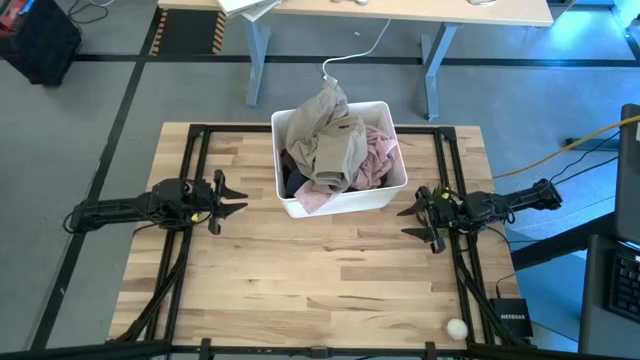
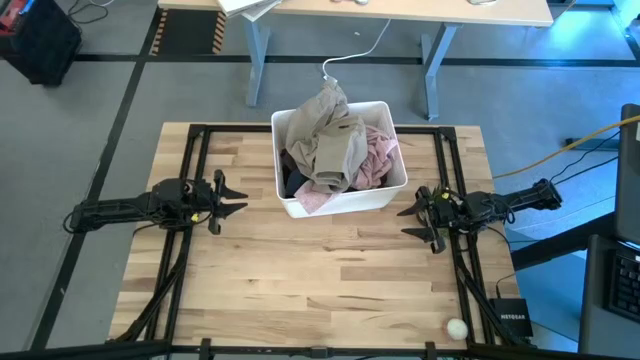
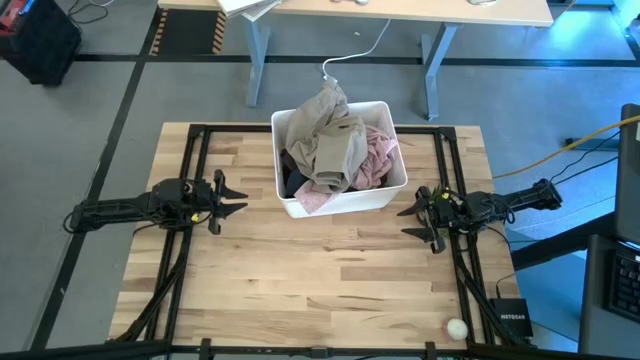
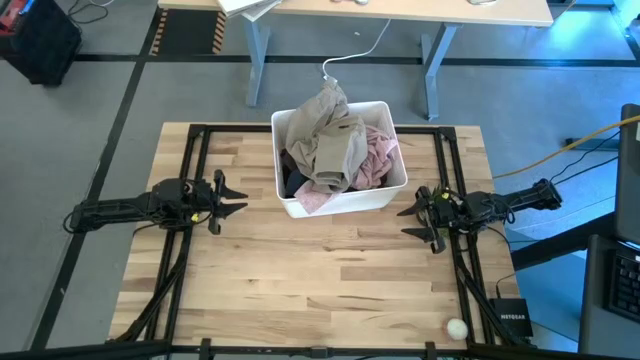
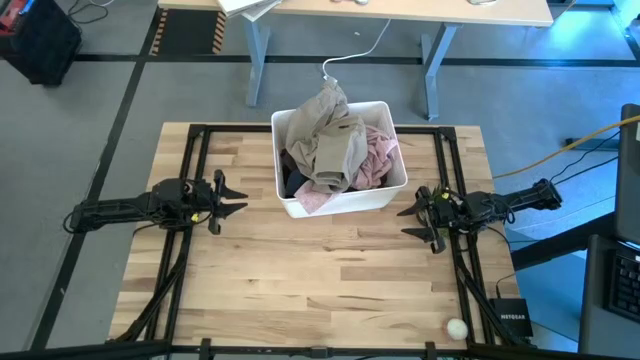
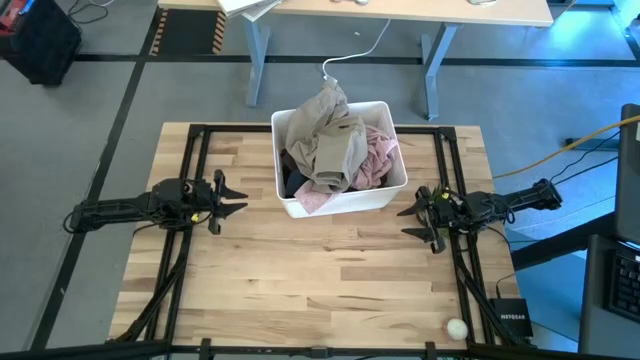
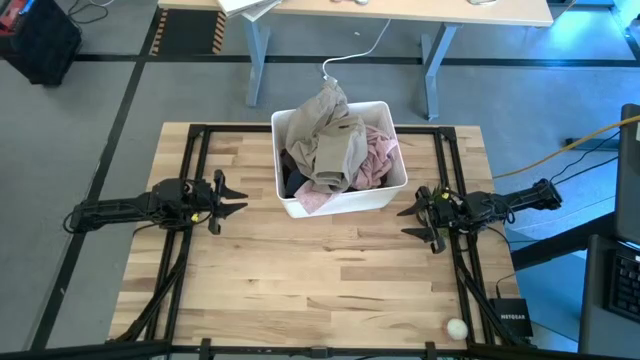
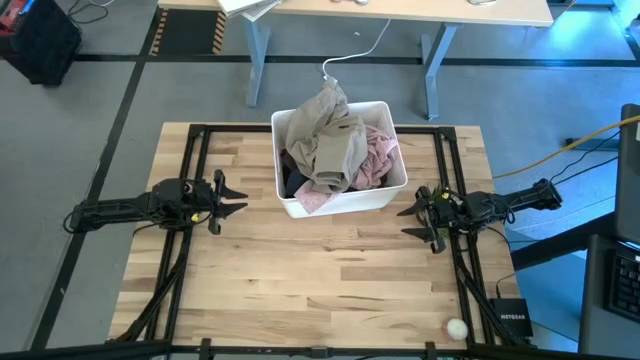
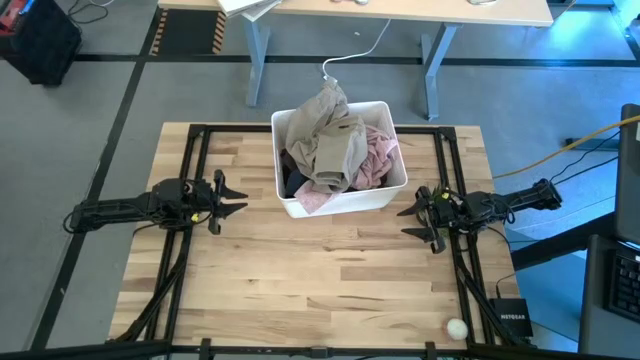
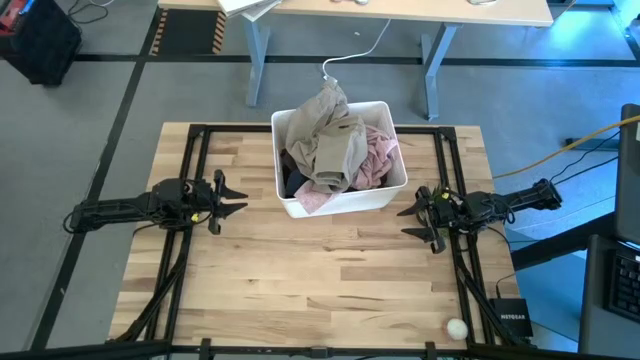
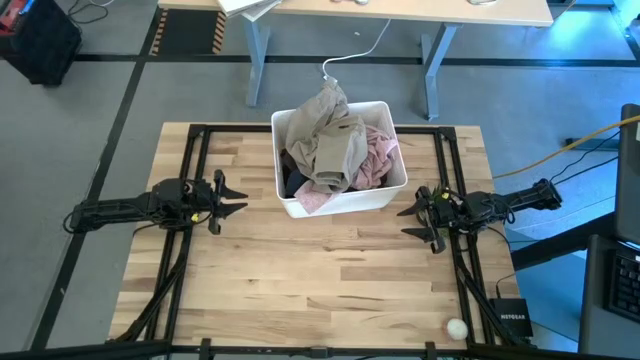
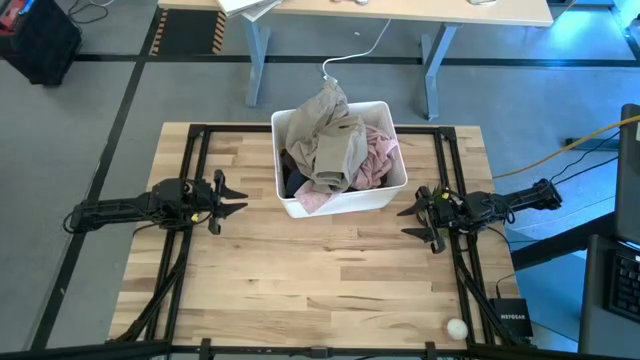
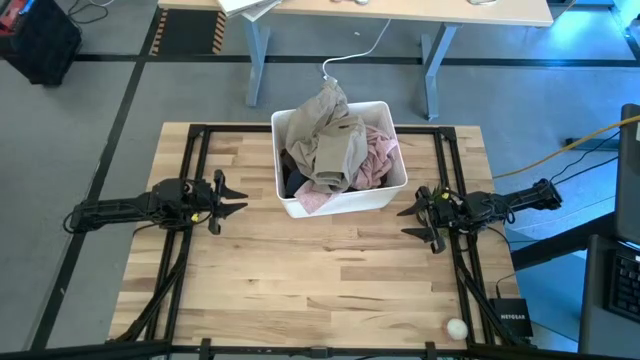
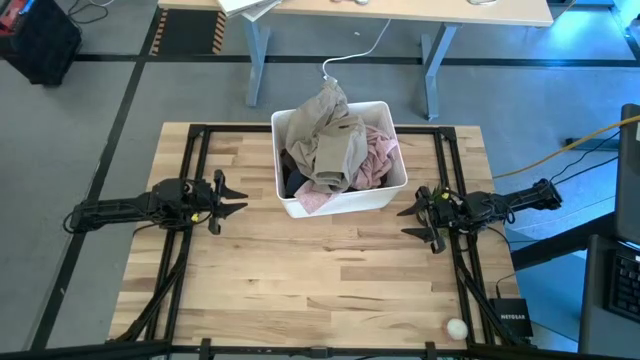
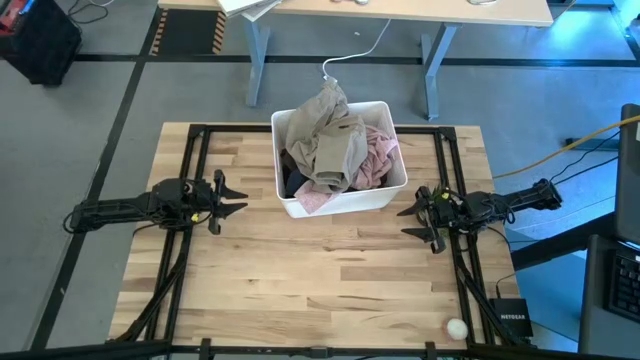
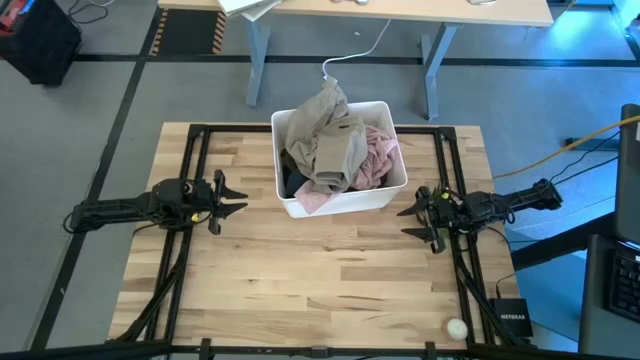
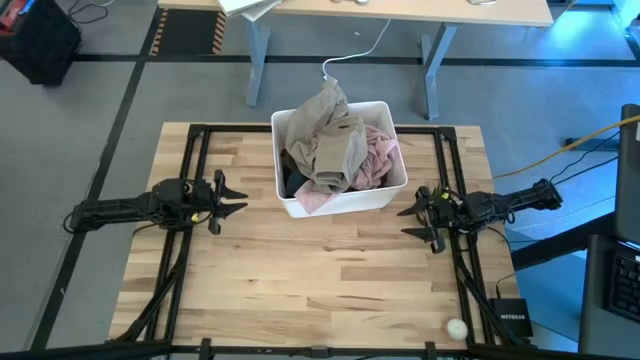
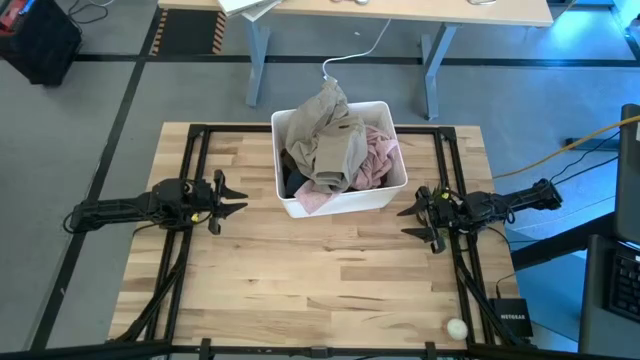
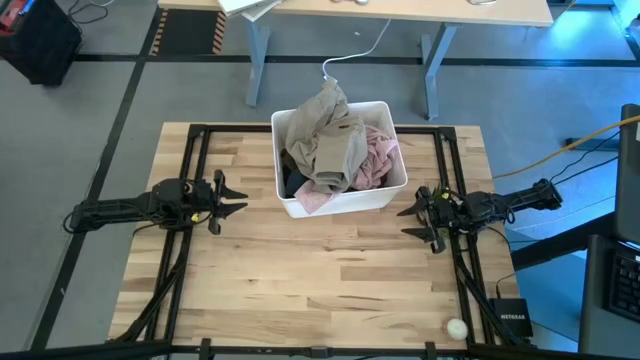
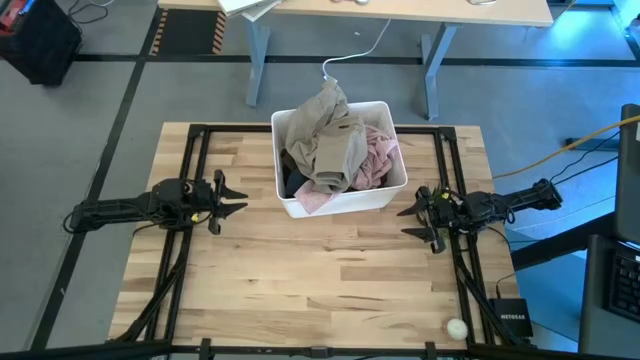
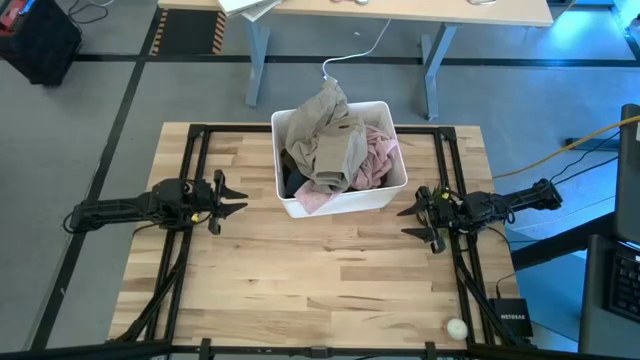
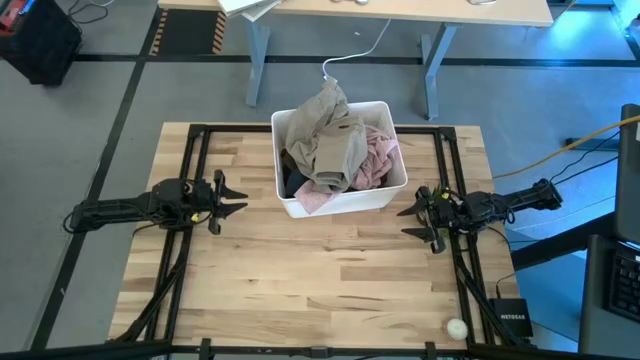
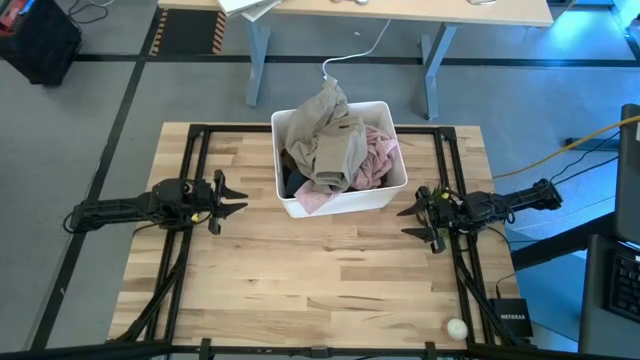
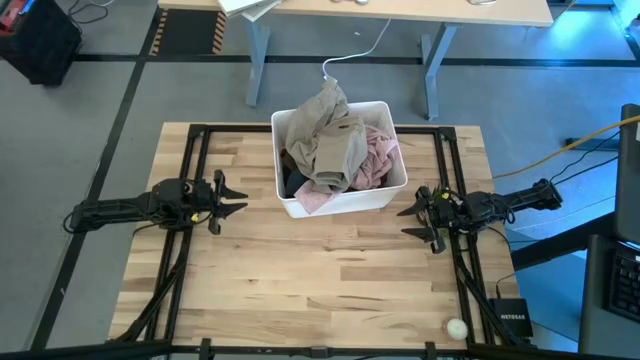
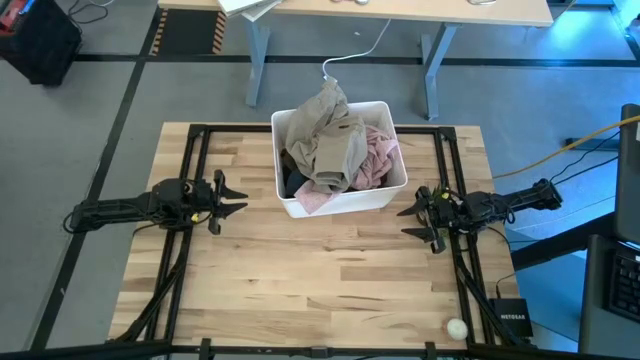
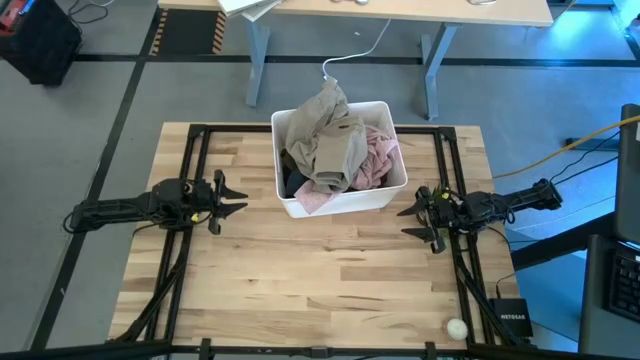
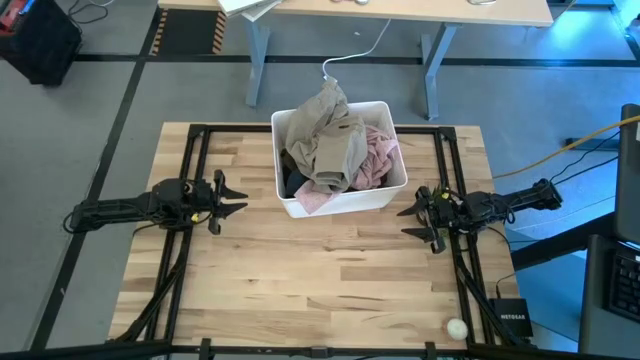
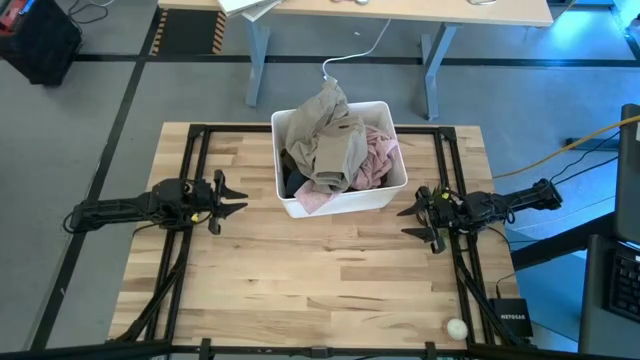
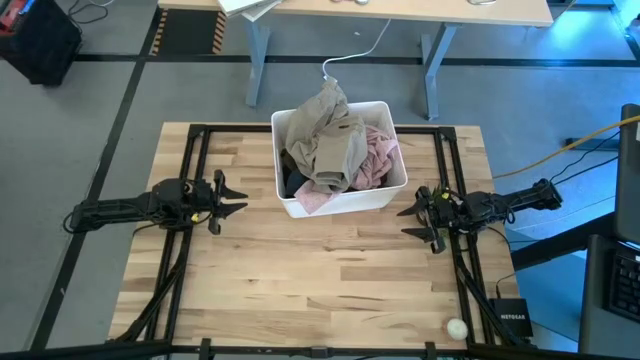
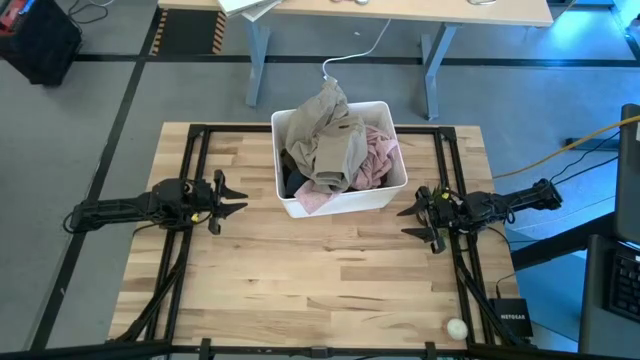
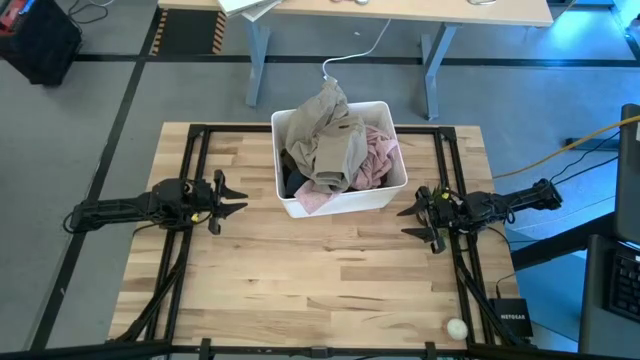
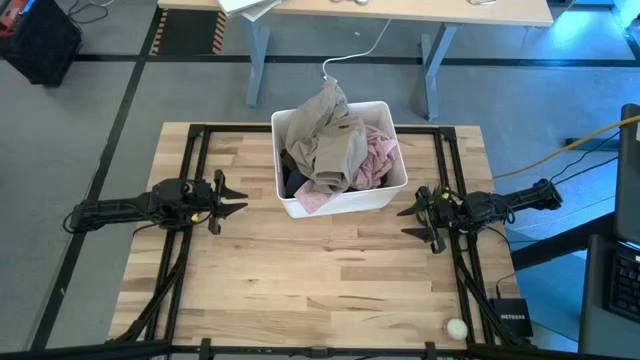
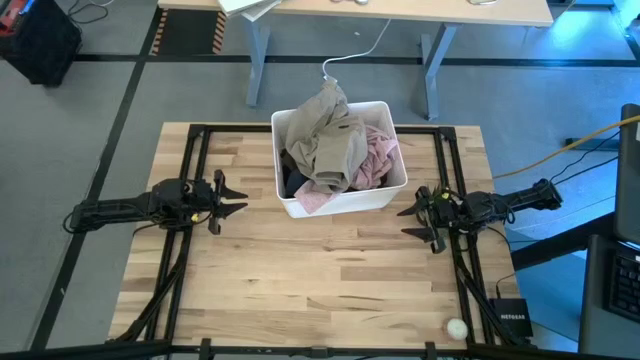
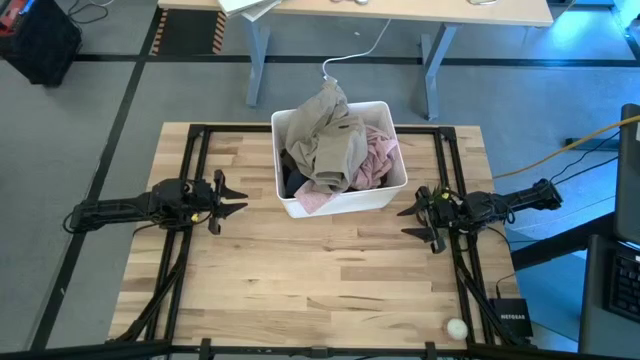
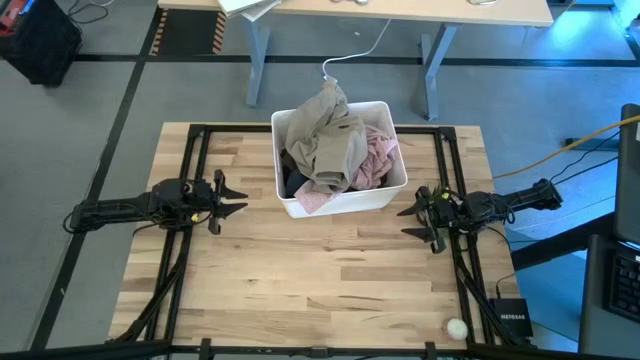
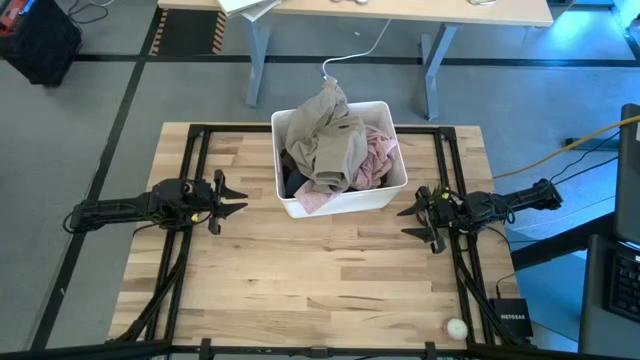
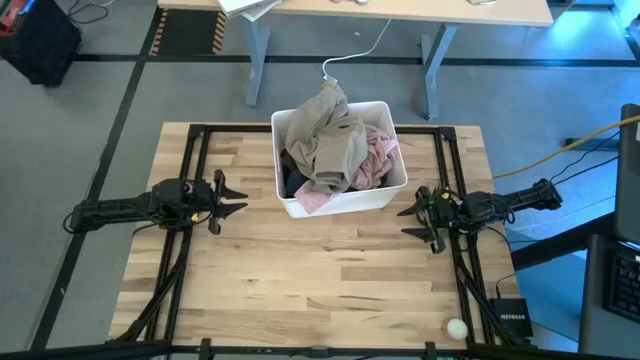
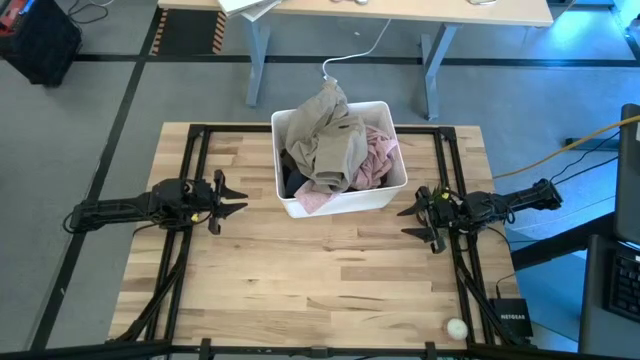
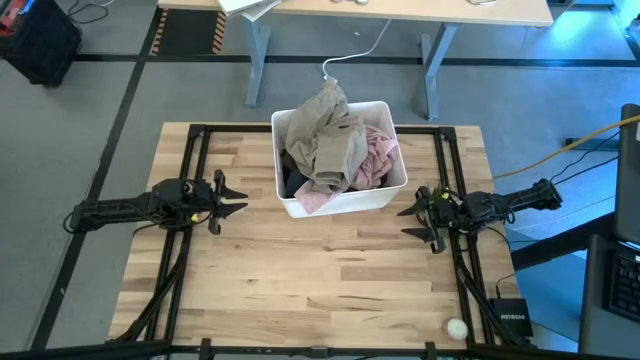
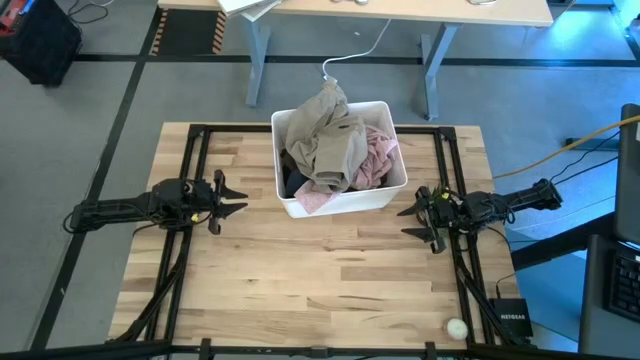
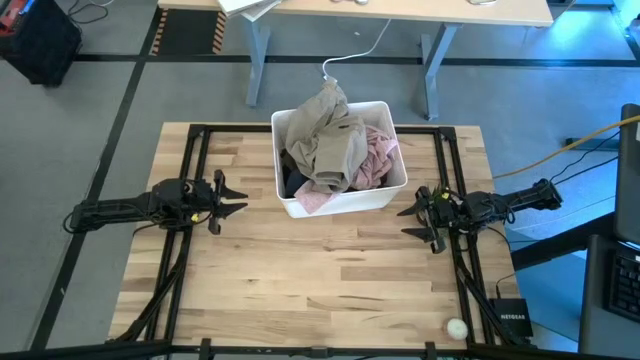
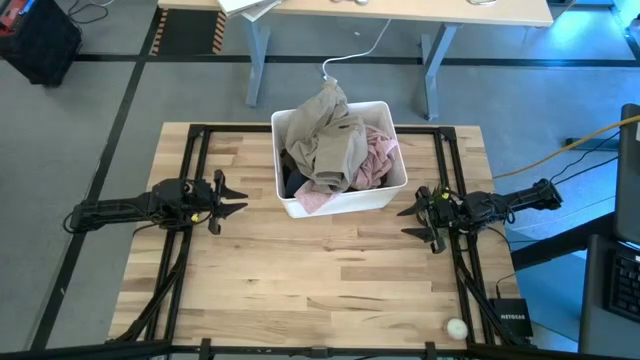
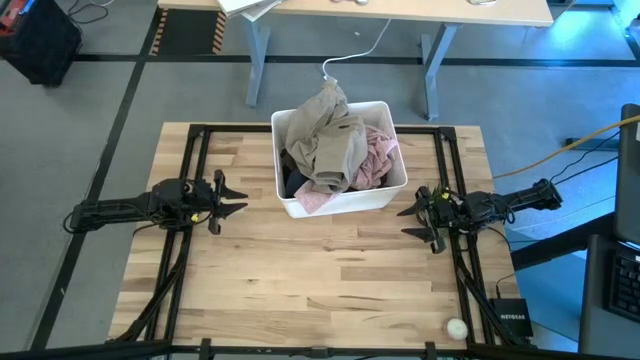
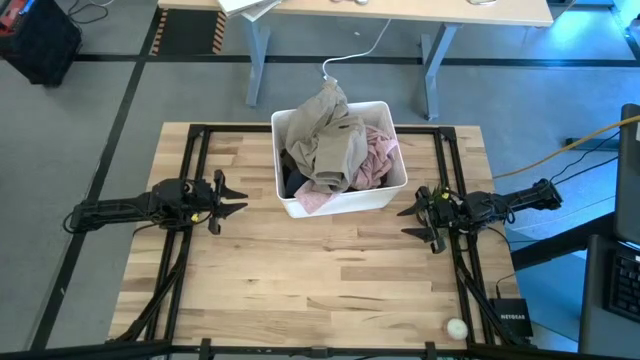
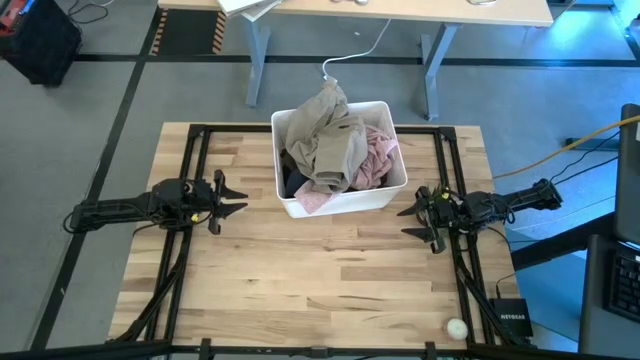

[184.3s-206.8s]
Task: Sort clothes
Return to Home Position
